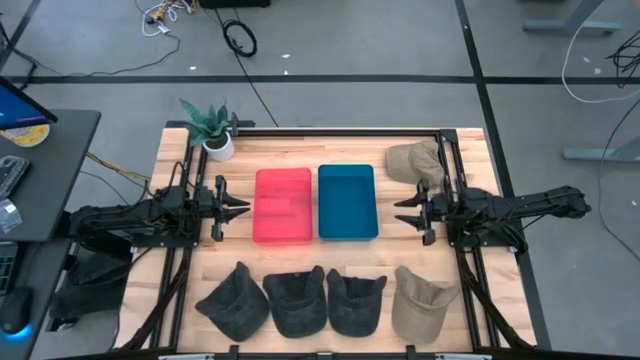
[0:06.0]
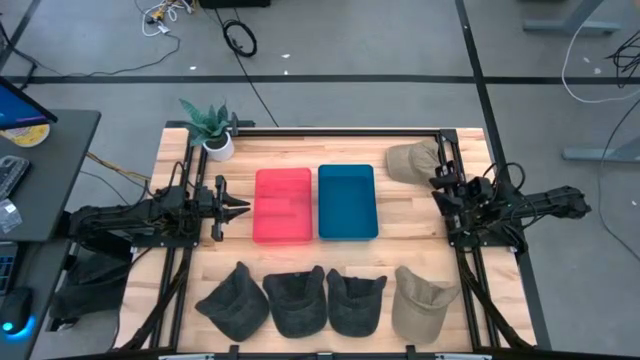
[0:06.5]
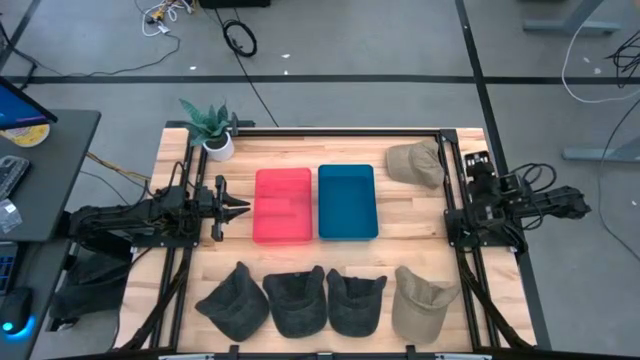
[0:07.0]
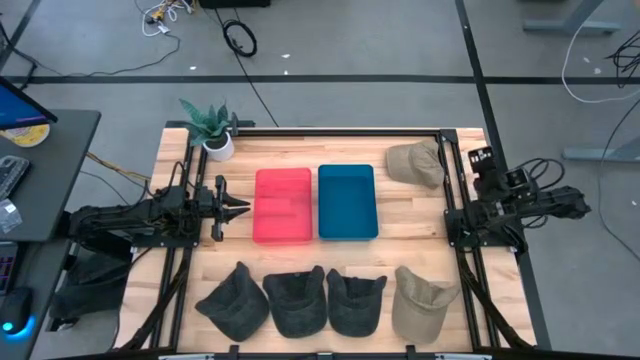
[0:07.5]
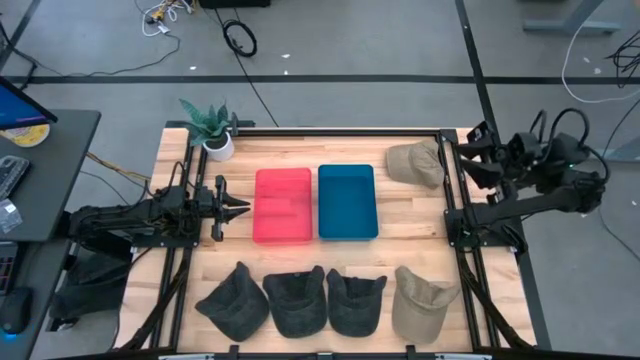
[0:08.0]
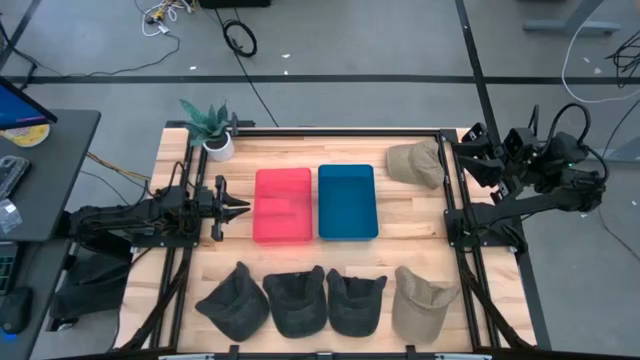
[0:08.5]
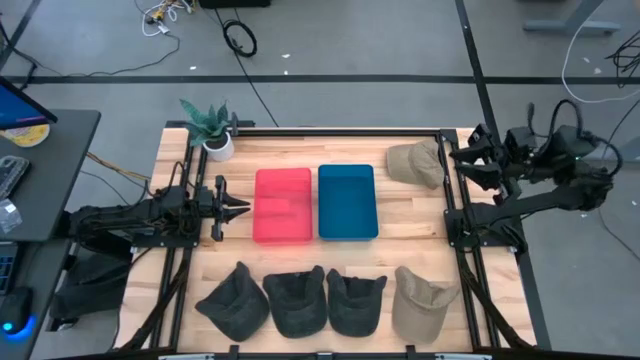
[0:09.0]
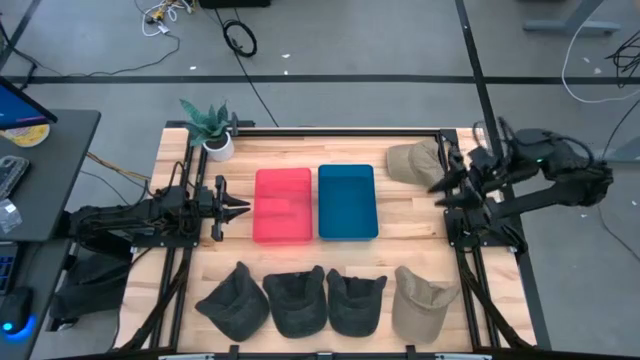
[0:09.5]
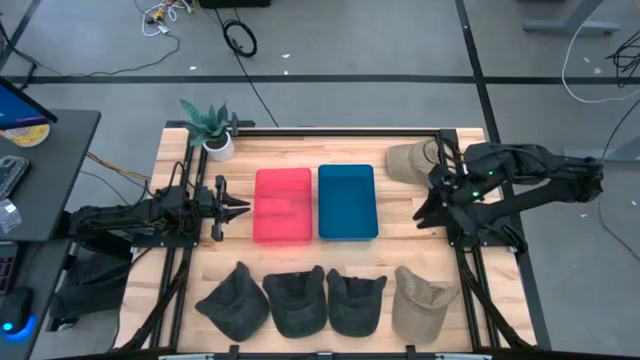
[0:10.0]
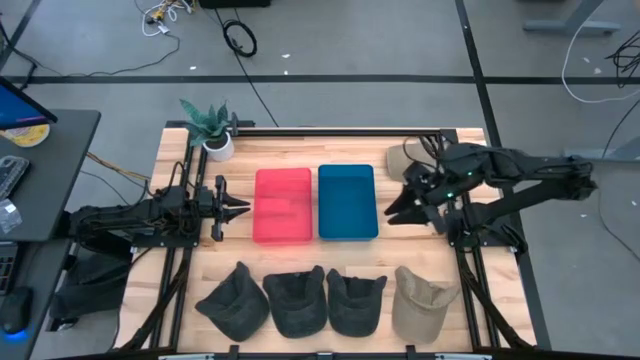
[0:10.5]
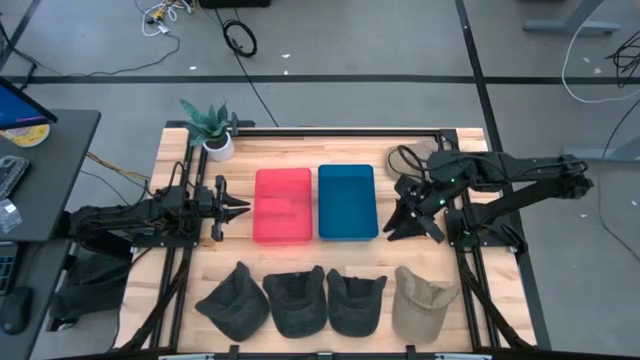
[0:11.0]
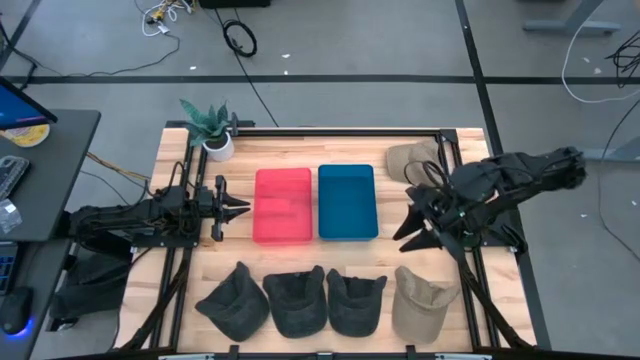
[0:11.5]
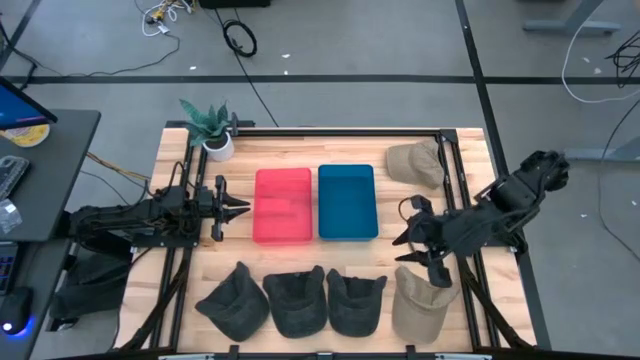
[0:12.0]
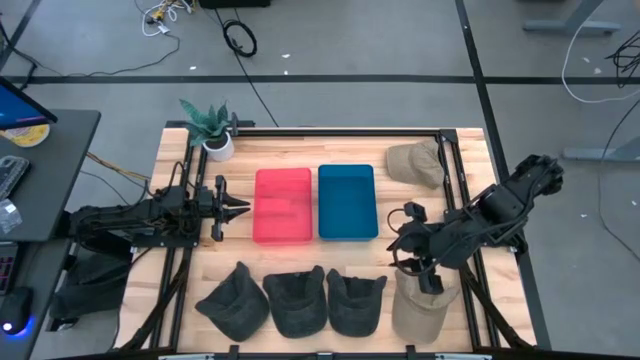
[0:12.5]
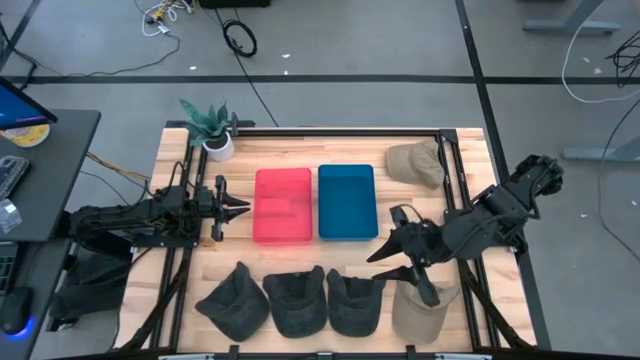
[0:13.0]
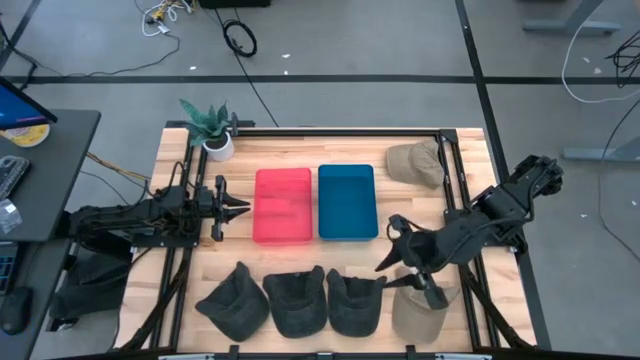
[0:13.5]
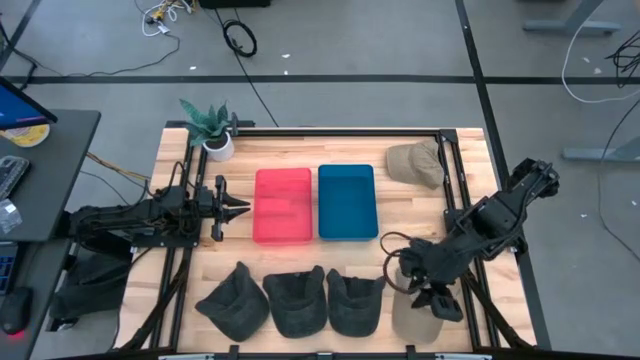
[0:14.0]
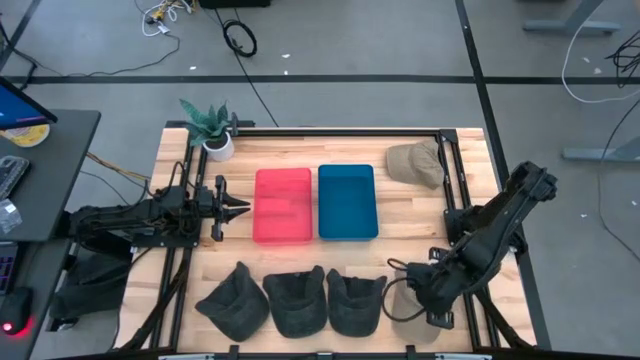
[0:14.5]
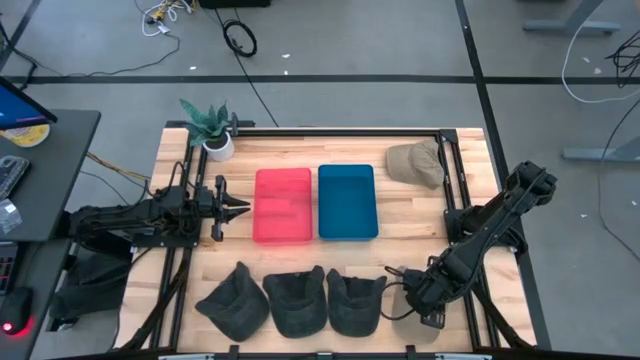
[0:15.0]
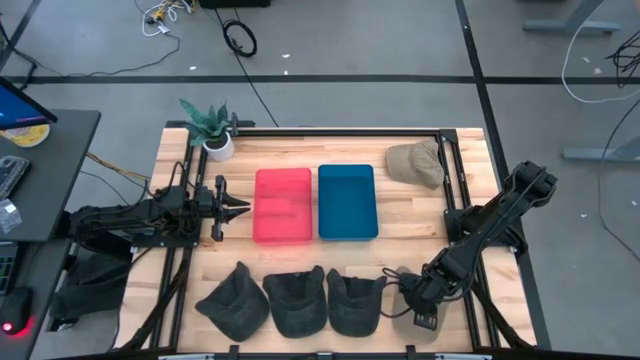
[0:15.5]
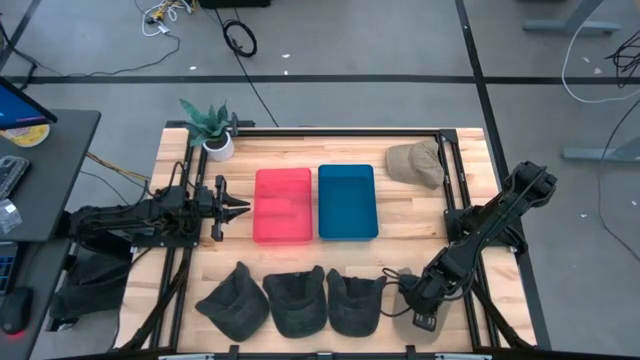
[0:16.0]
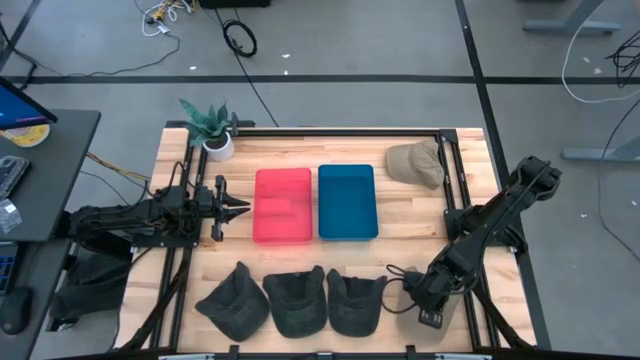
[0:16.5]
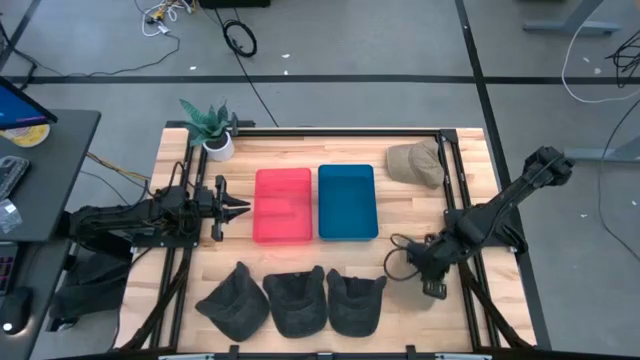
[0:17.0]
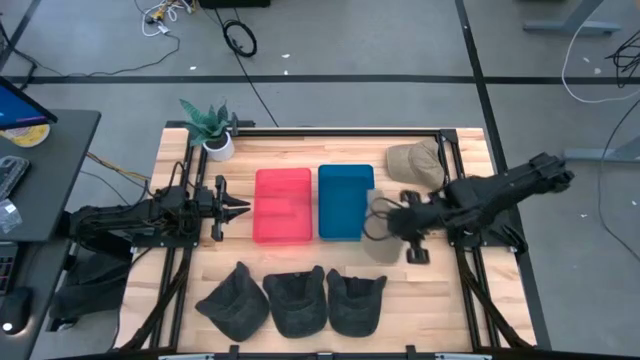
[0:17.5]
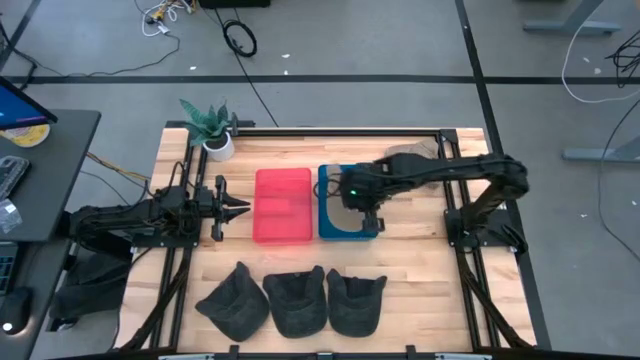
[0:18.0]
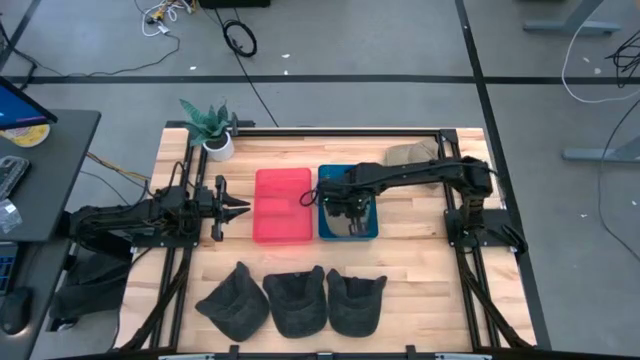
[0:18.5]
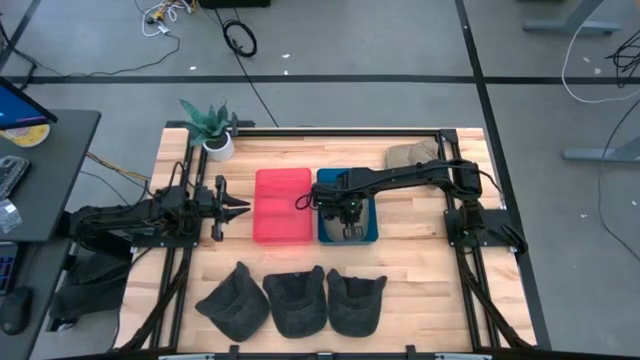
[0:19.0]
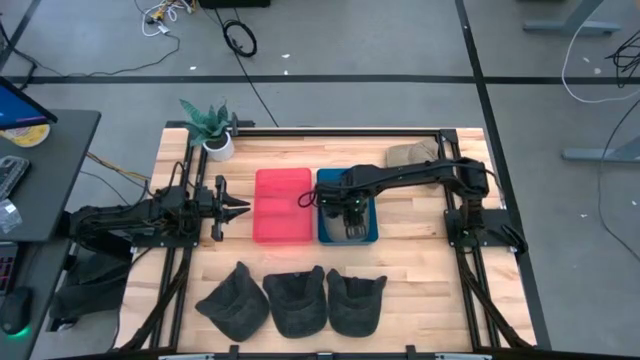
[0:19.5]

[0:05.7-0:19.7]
Task: Pick & Place hat
Put the bottom brown cap into the blue bin

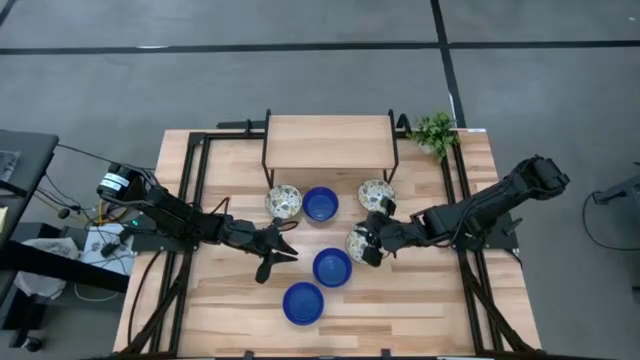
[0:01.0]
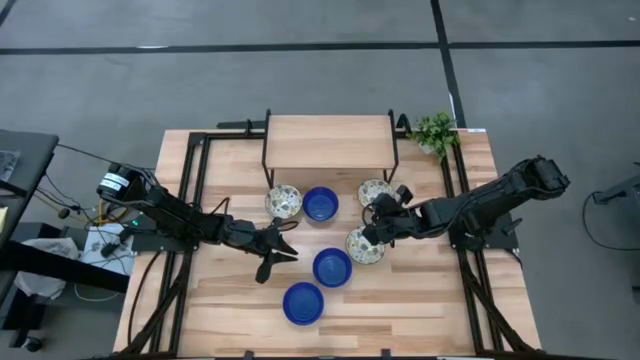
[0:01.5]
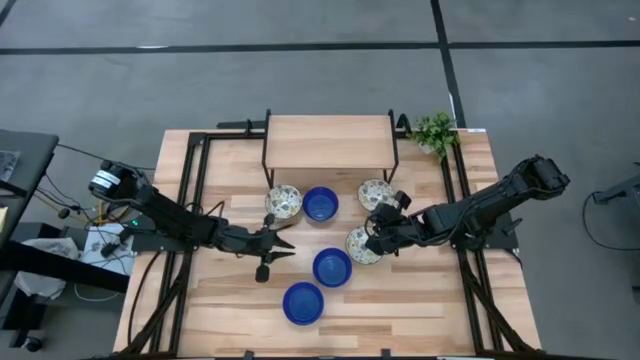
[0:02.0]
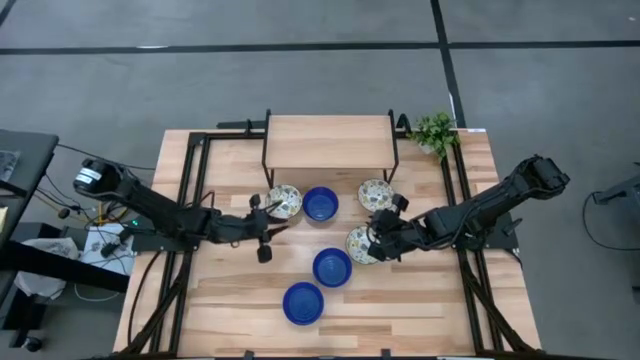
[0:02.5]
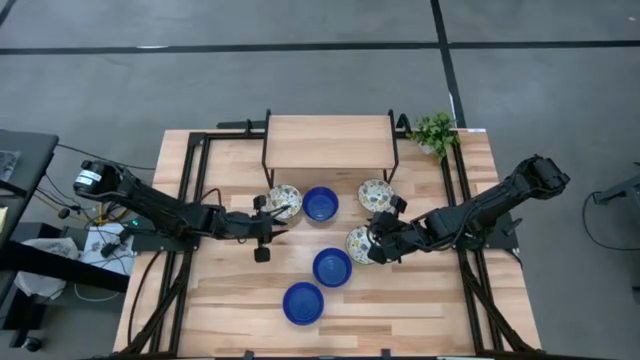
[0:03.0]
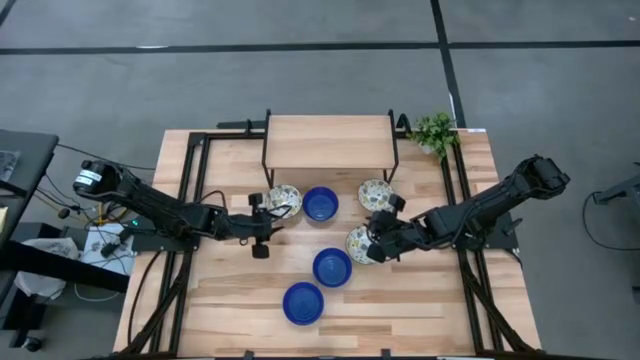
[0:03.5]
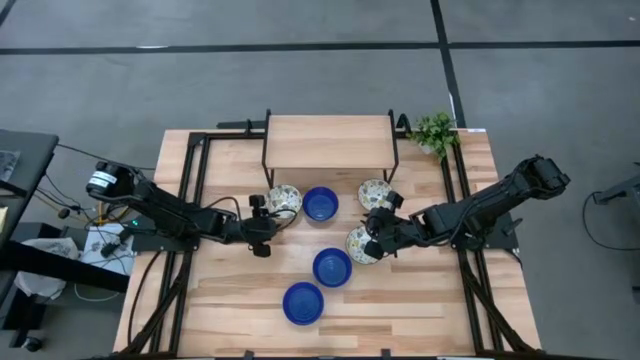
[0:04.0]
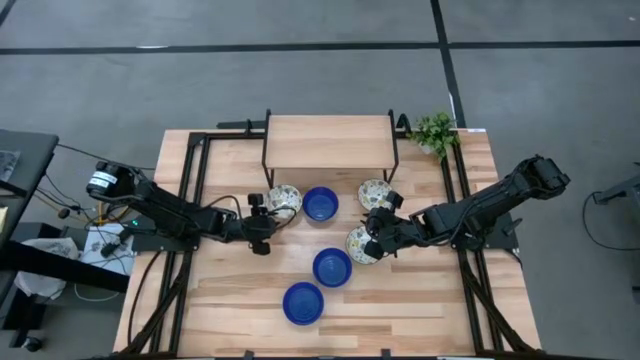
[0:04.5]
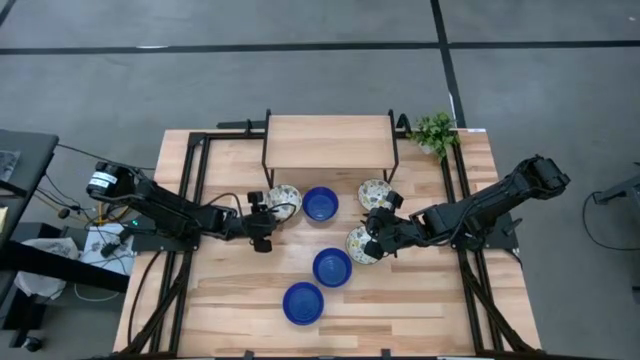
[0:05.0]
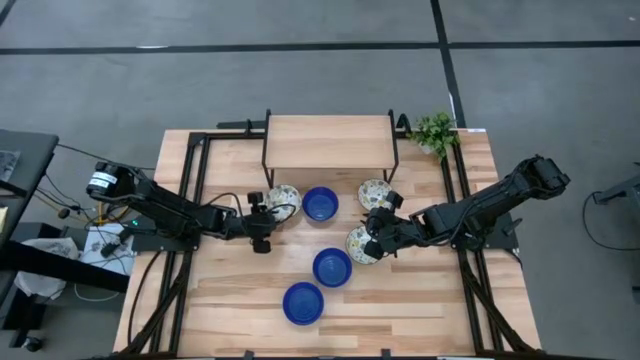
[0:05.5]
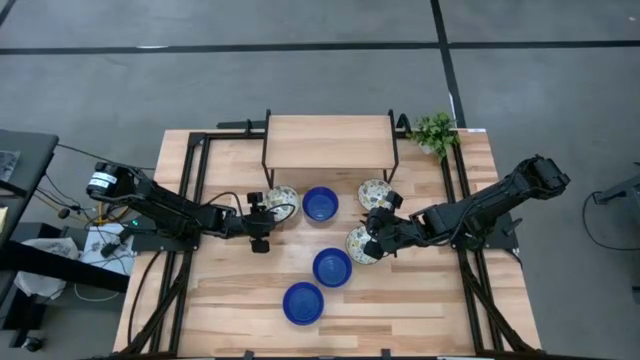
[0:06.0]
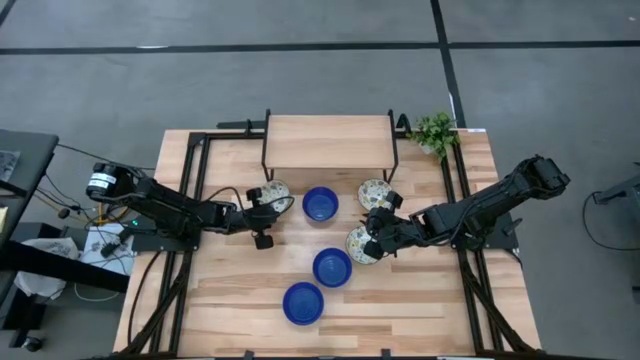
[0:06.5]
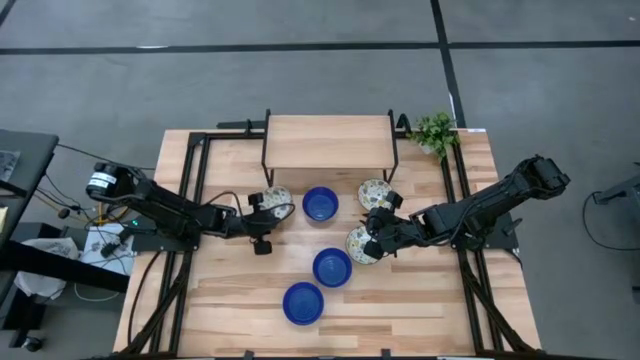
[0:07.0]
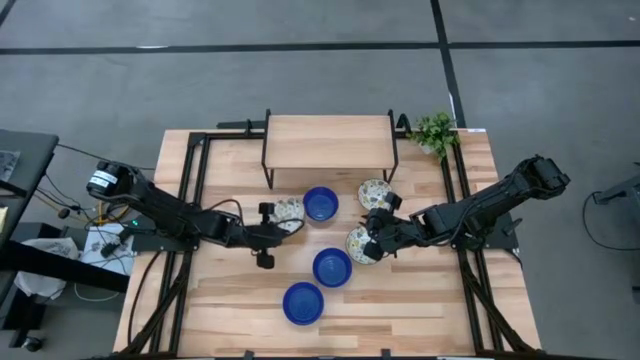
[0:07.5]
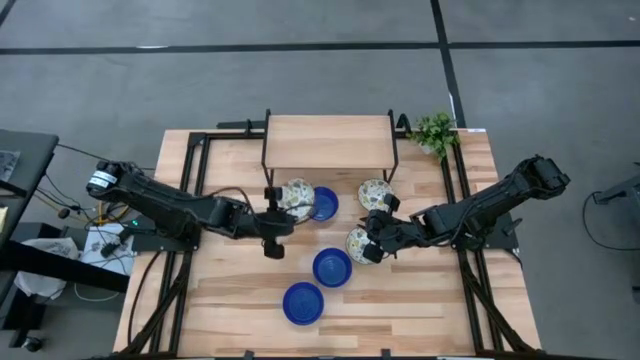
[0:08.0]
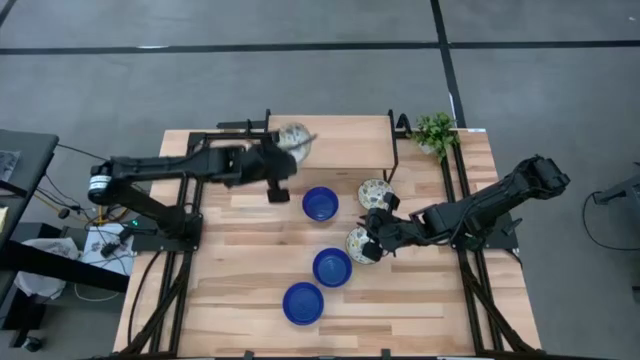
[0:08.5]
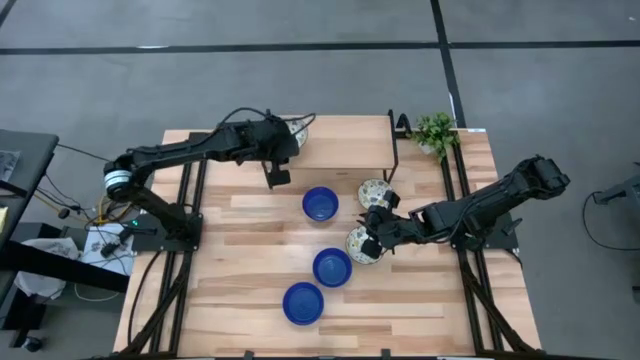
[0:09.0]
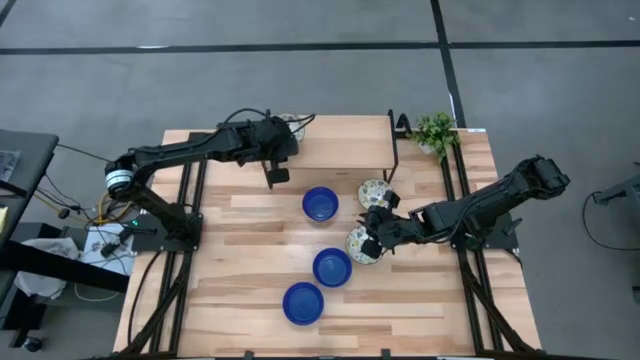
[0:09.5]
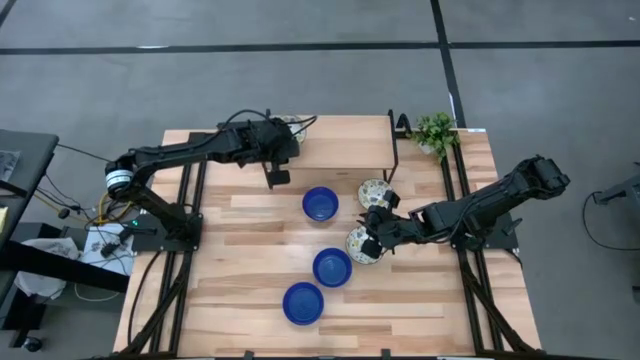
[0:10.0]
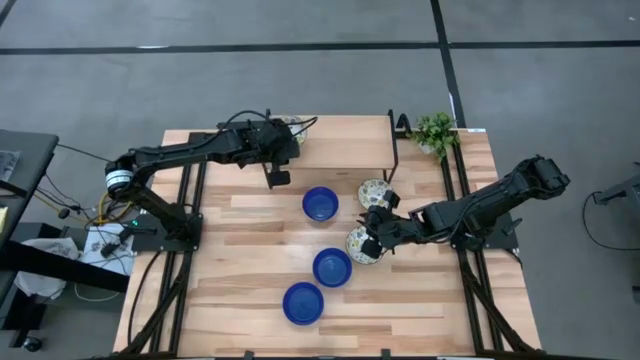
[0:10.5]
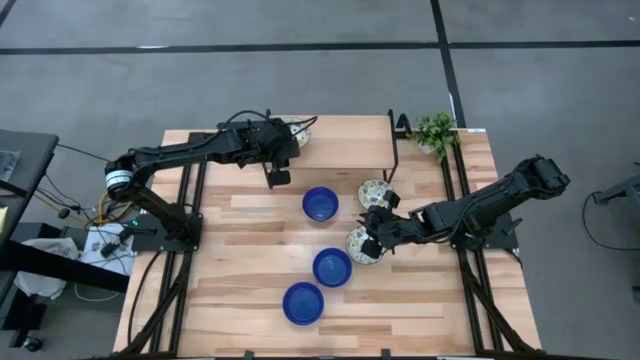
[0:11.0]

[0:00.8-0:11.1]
Task: Pick & Place Mini bowls
Put the top left white patterned bowl on the shelf
